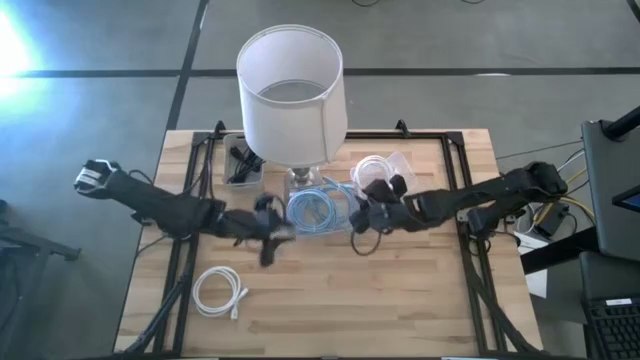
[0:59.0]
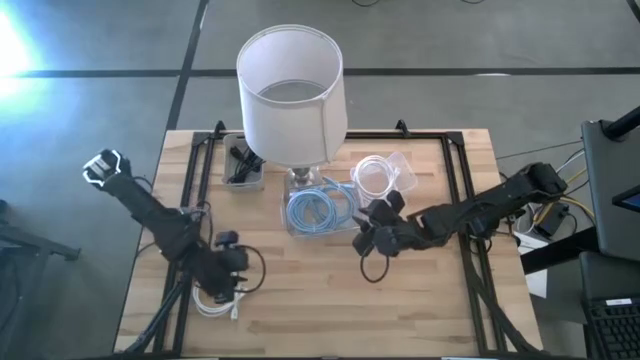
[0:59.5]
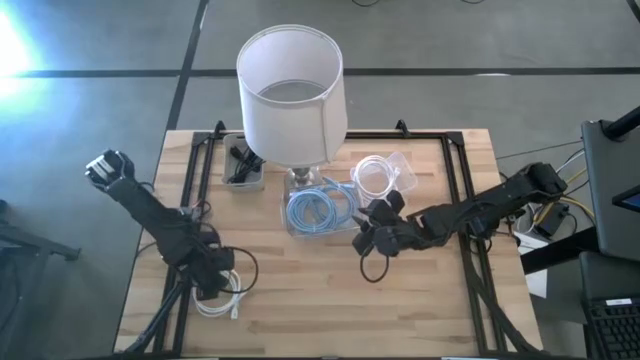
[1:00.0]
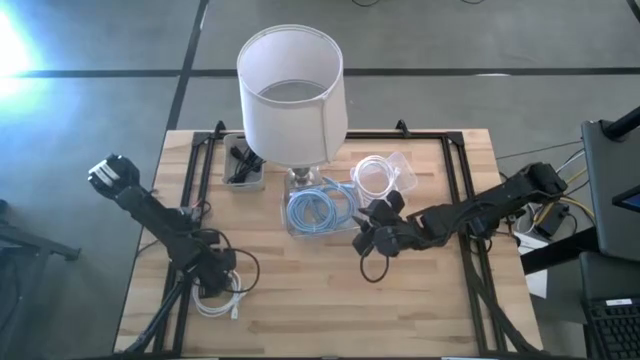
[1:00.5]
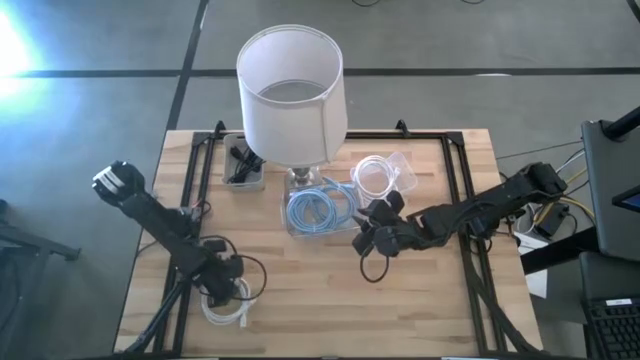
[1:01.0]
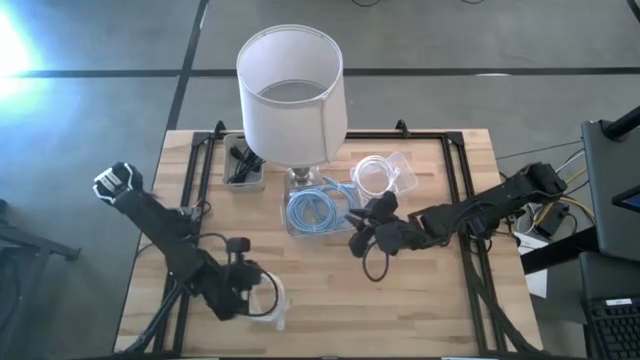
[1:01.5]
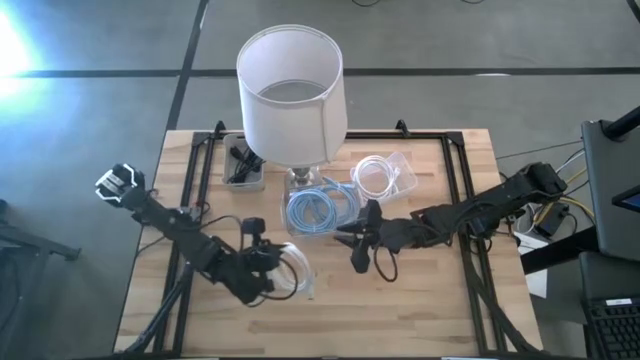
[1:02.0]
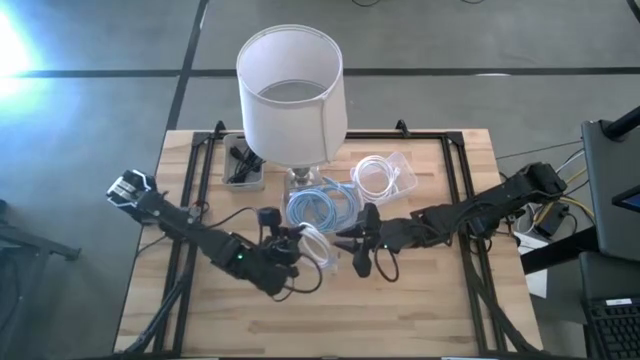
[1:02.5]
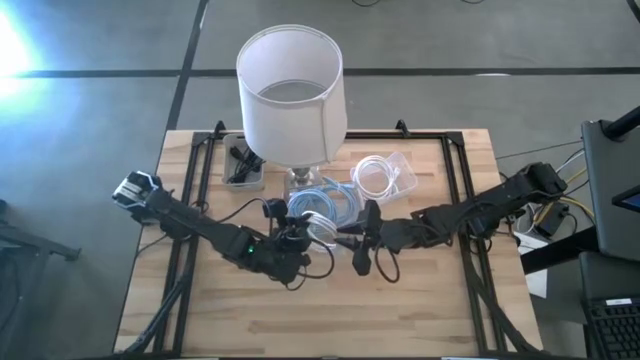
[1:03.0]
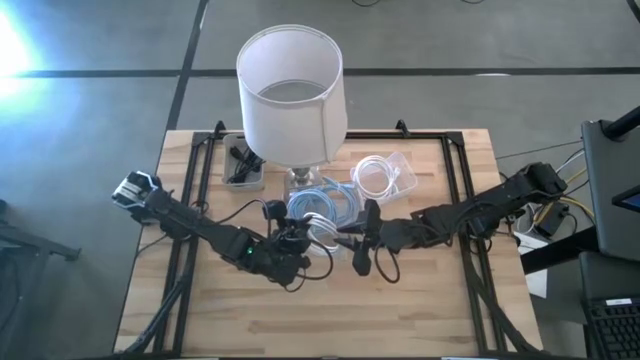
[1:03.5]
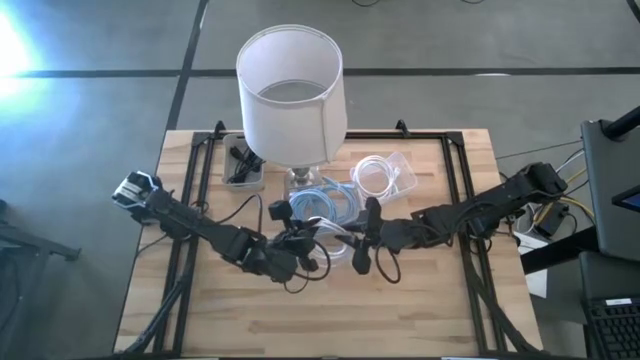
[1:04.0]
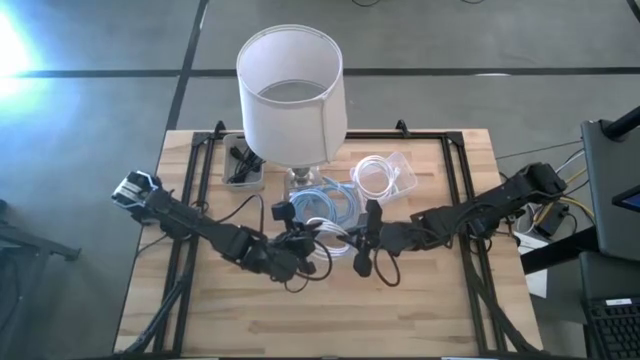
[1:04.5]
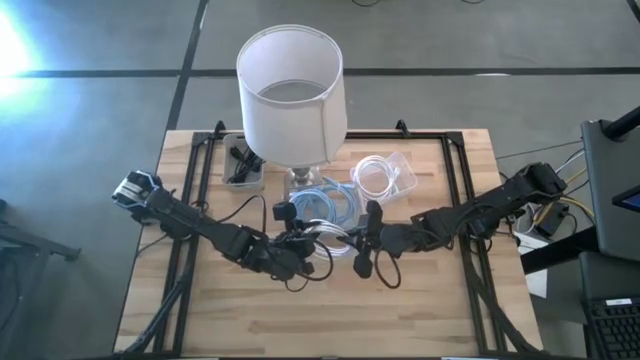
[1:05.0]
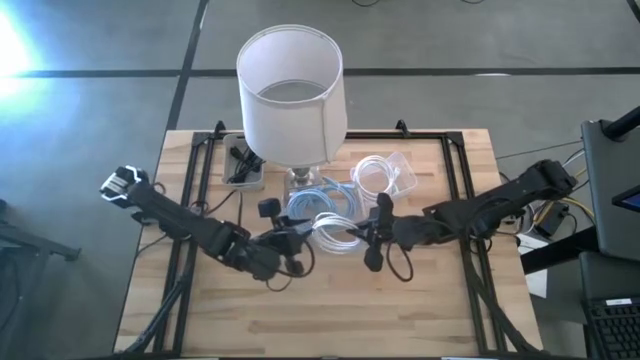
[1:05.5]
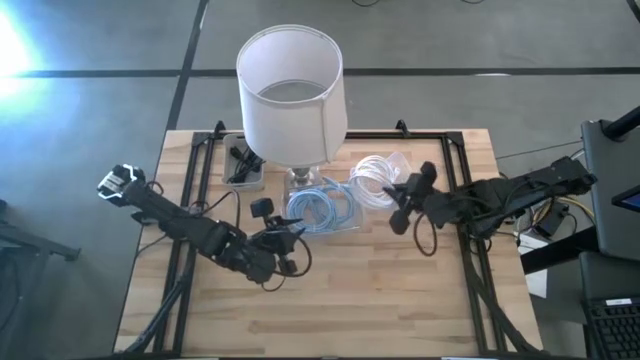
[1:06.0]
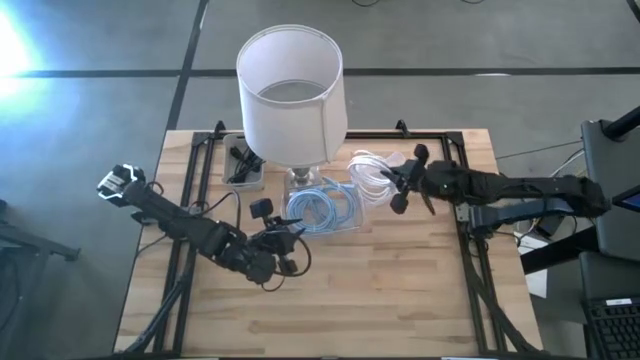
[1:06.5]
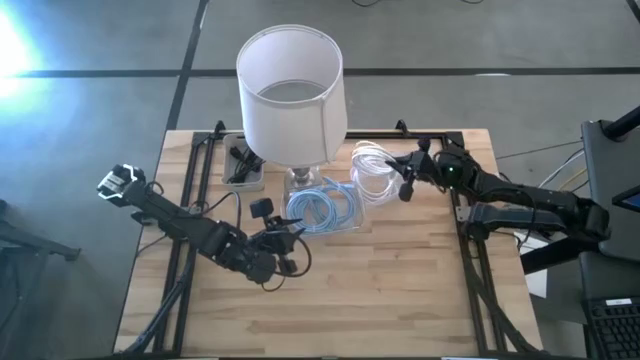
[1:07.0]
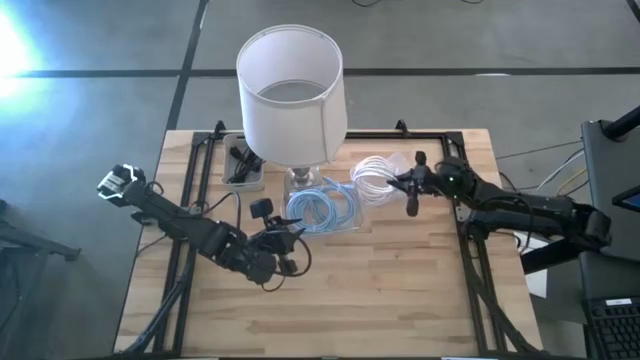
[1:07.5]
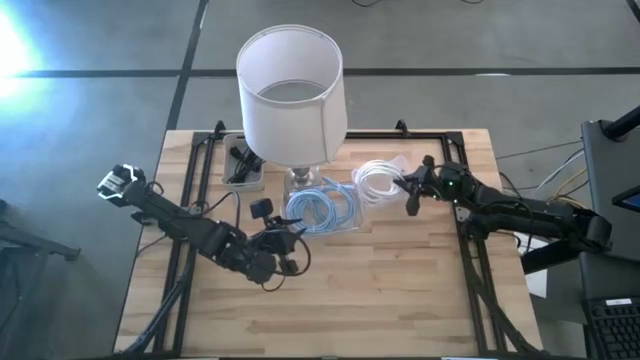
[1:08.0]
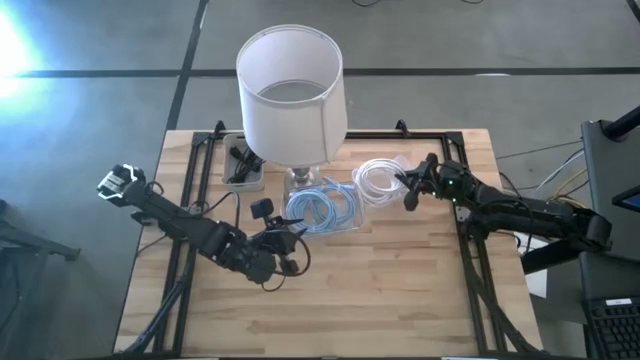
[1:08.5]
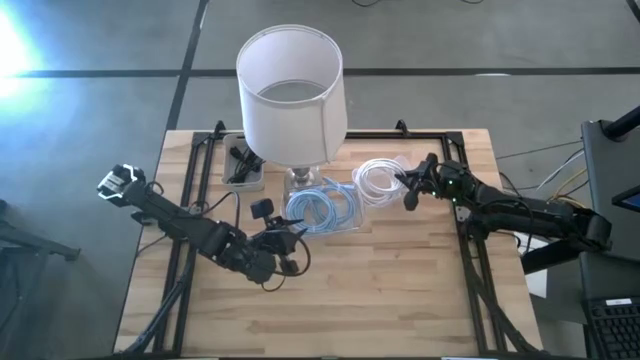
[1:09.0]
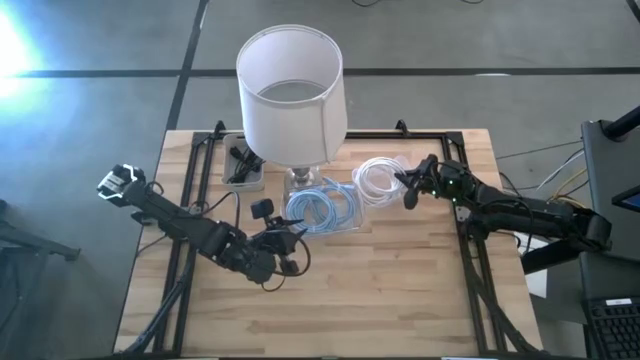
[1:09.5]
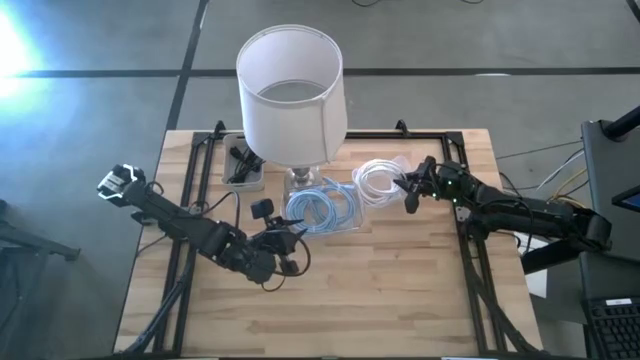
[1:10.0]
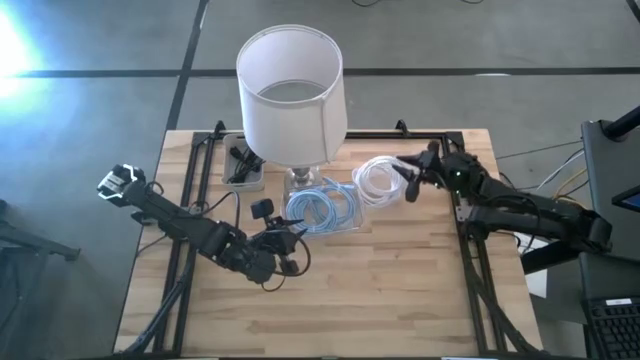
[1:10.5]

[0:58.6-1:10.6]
Task: Pick & Place USB Port
Put the white hdmi cable into the right transparent bin

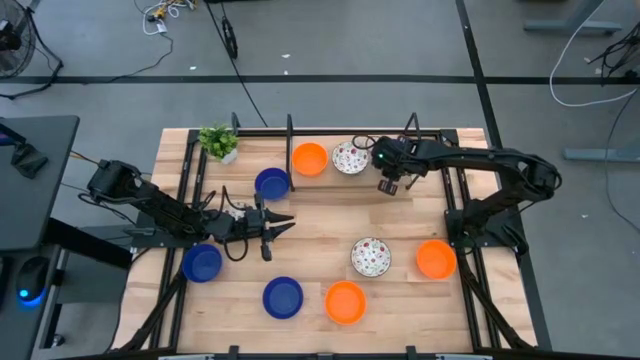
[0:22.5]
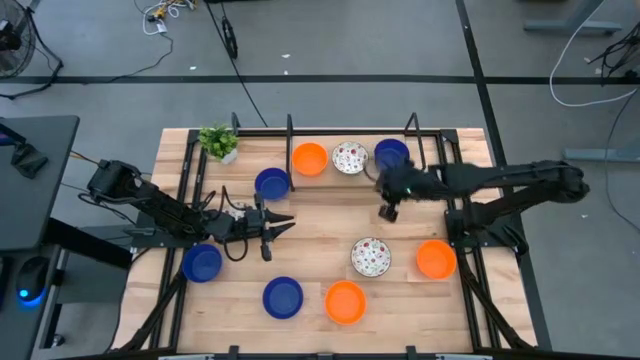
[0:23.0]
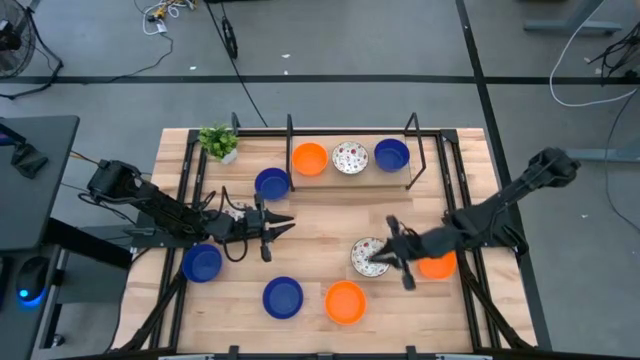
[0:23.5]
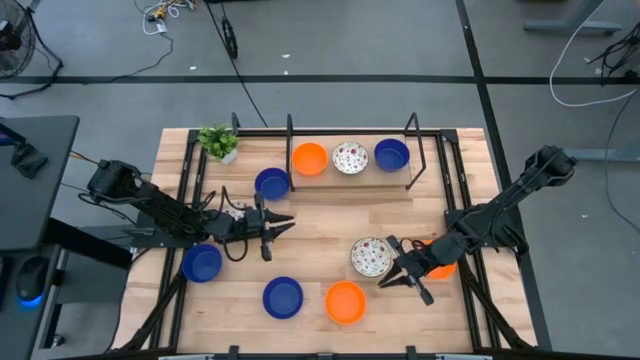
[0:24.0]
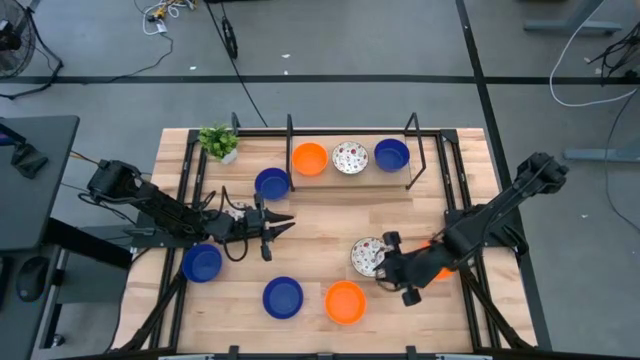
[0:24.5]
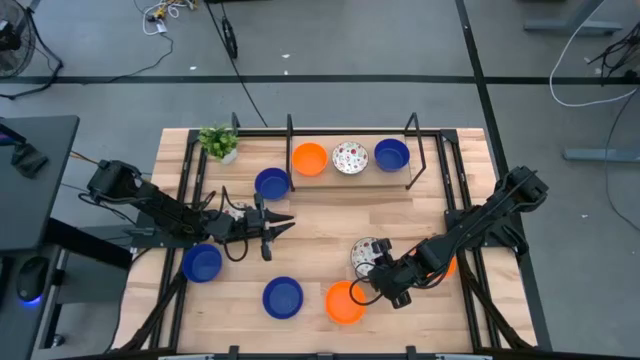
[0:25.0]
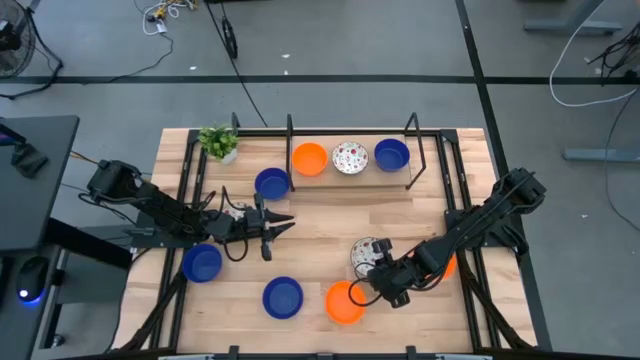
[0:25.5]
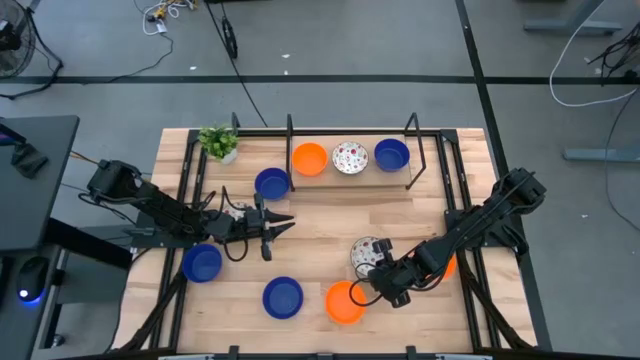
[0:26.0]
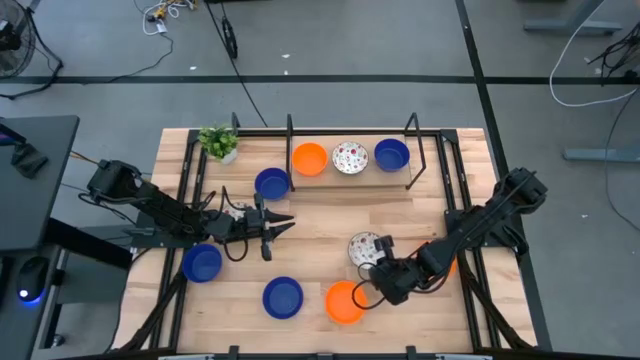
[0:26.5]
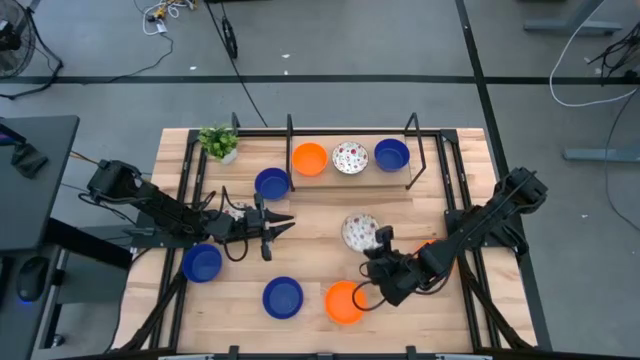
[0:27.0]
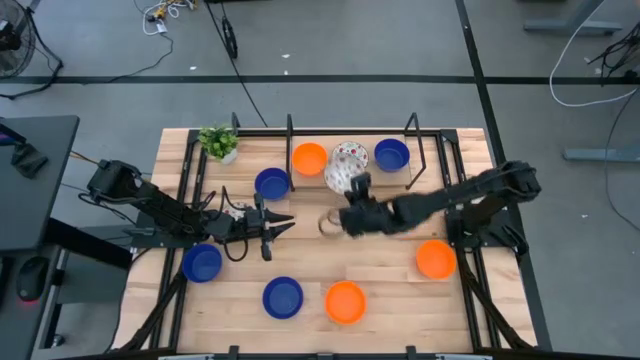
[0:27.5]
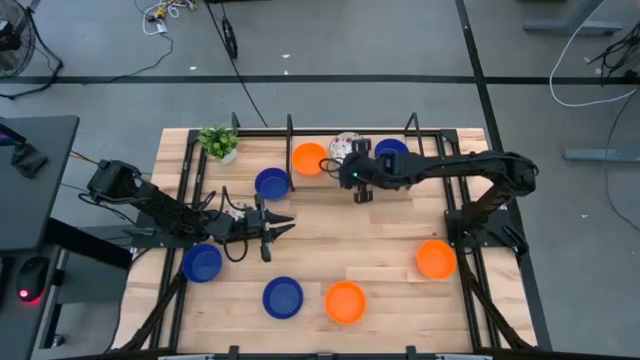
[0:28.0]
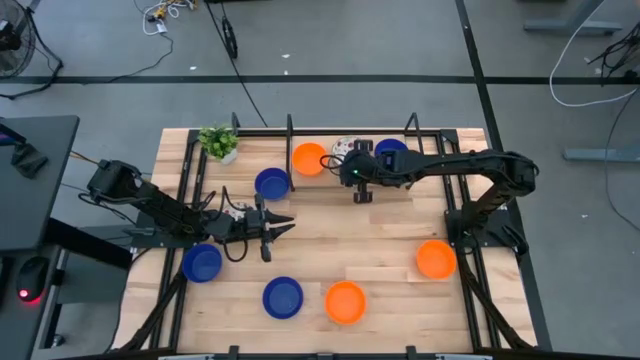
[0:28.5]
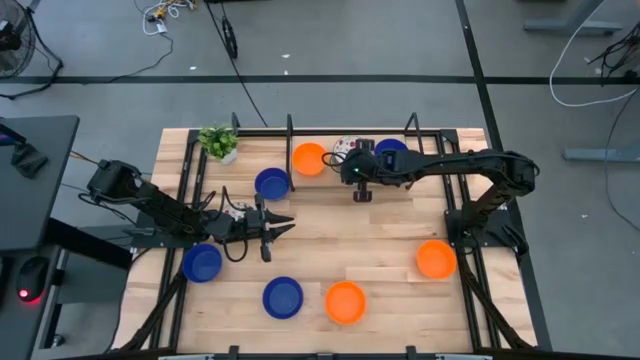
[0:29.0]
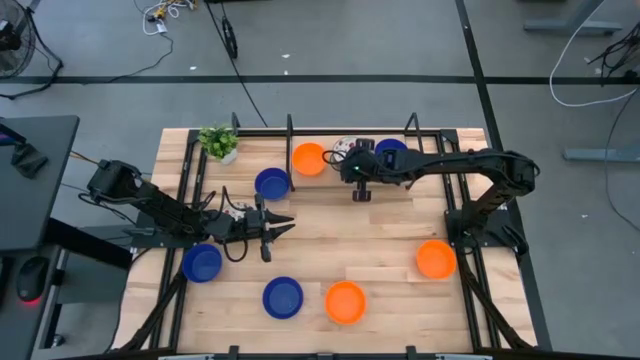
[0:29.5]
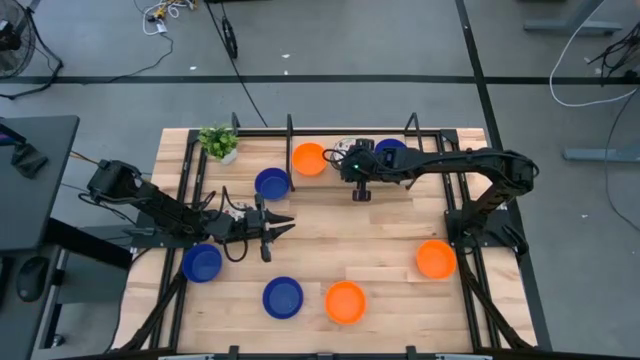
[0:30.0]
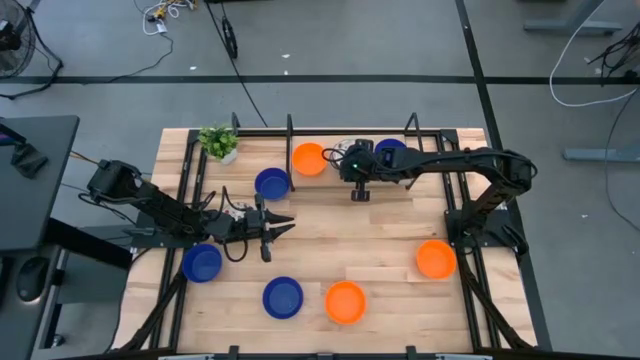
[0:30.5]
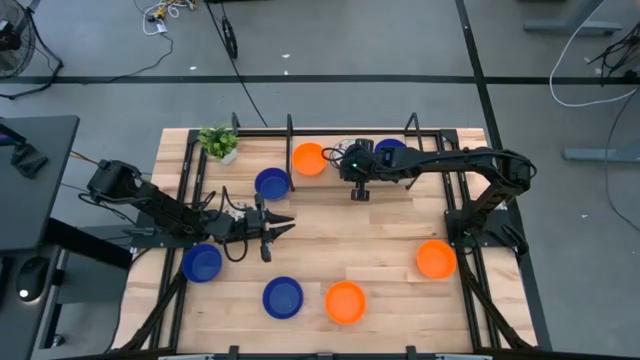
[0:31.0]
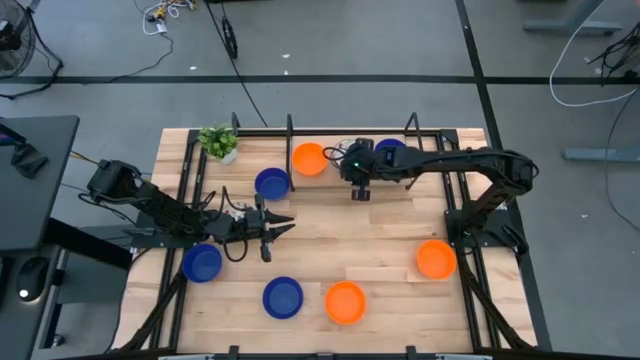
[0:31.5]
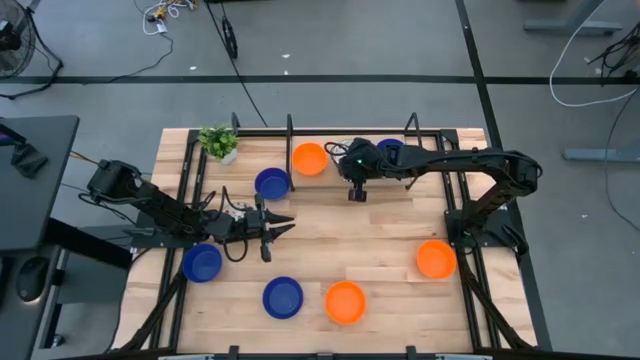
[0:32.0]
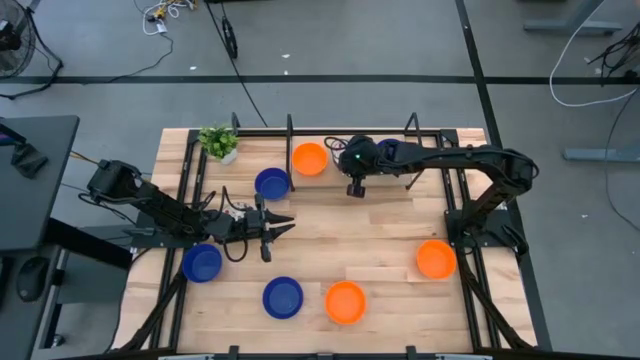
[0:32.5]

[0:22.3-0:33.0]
Task: Pick & Place Mini bowls
Stack the white bowl on top of the white bowl on the shelf
